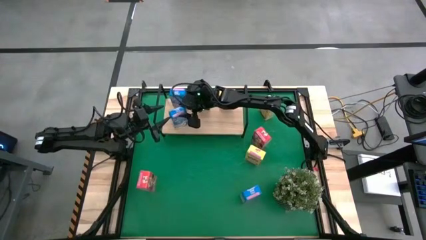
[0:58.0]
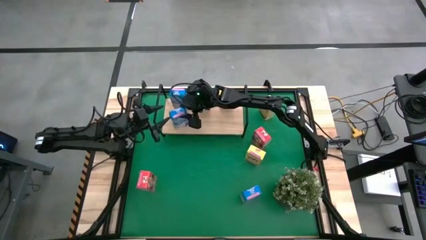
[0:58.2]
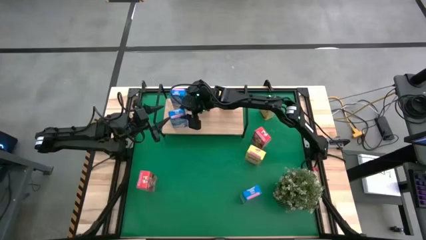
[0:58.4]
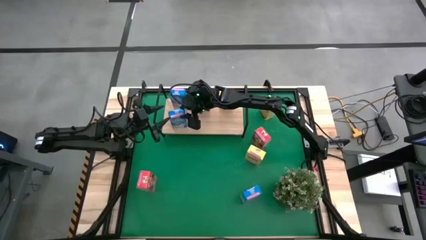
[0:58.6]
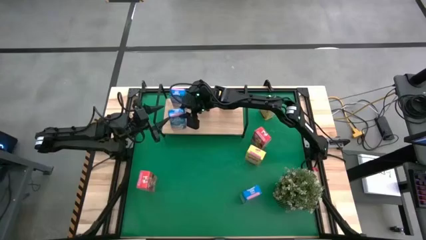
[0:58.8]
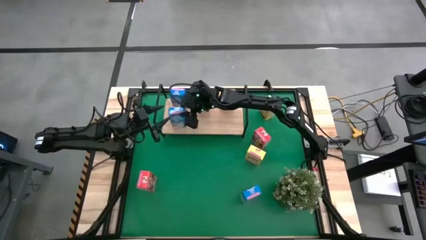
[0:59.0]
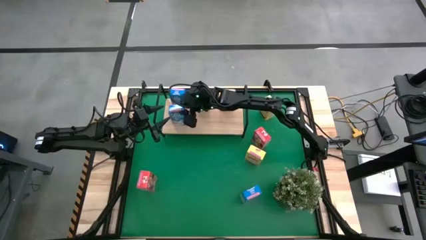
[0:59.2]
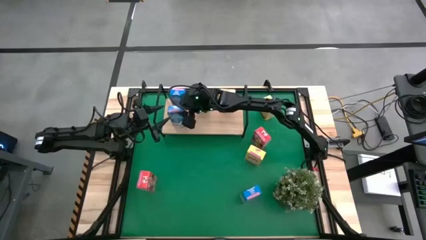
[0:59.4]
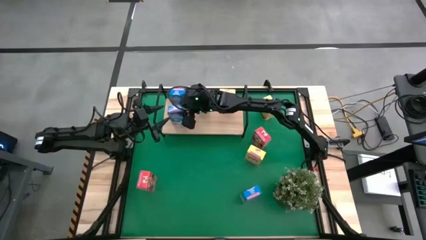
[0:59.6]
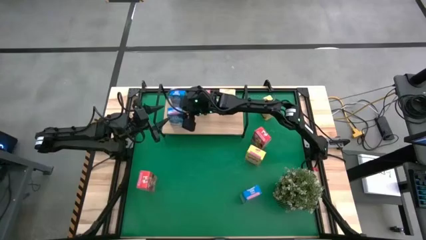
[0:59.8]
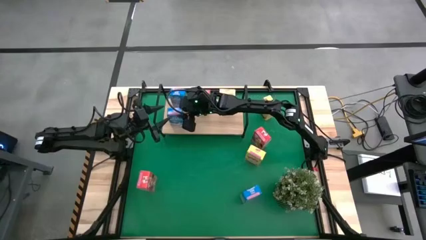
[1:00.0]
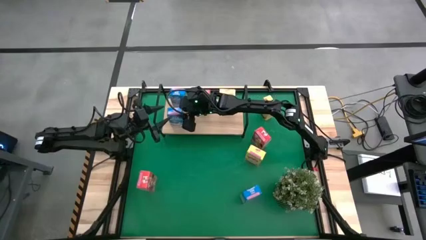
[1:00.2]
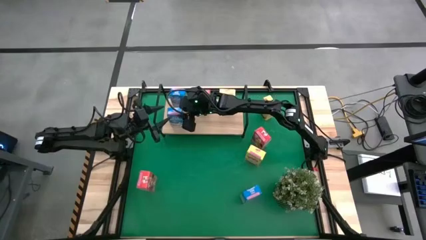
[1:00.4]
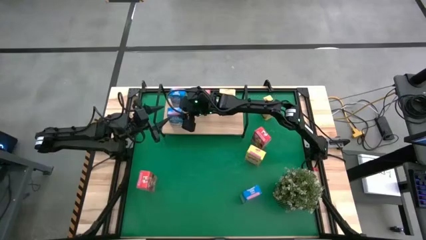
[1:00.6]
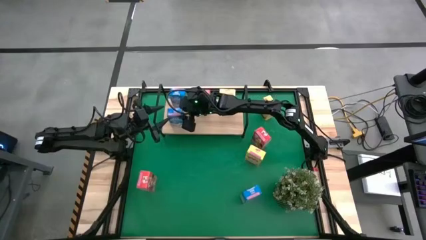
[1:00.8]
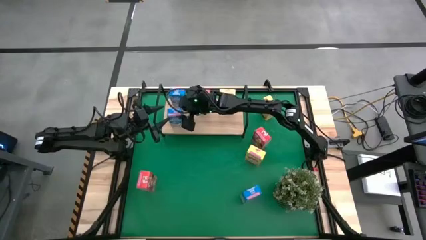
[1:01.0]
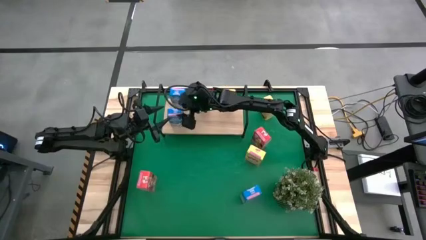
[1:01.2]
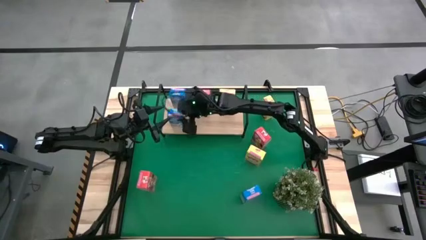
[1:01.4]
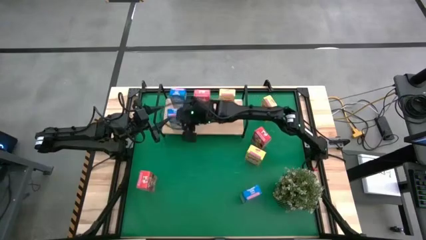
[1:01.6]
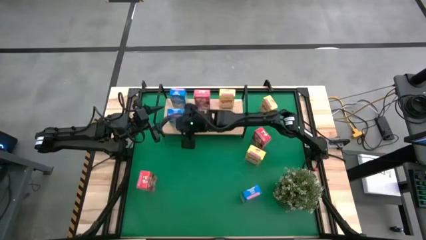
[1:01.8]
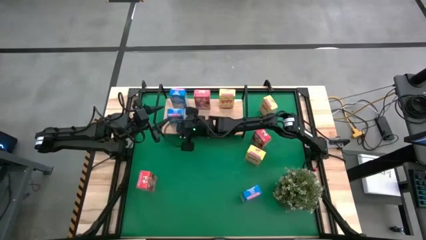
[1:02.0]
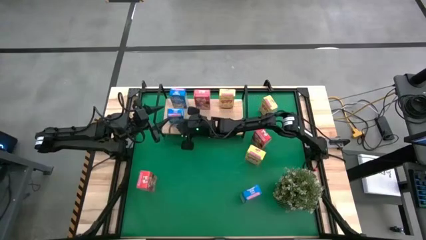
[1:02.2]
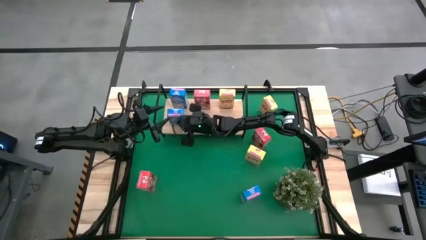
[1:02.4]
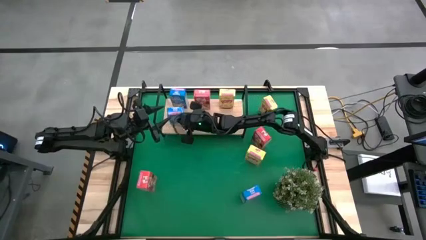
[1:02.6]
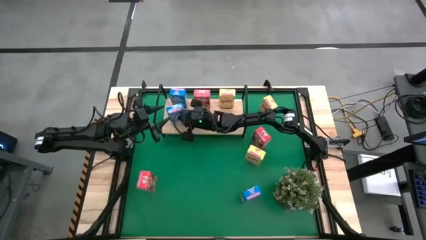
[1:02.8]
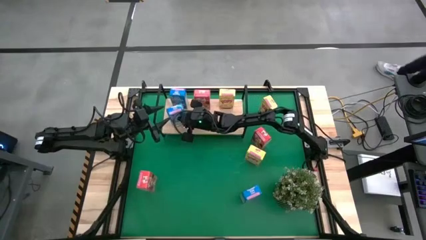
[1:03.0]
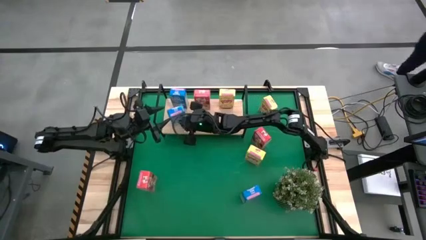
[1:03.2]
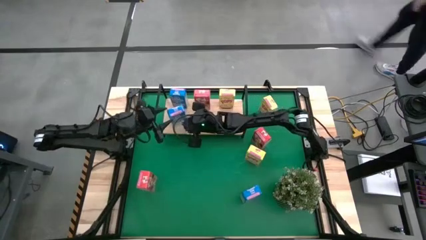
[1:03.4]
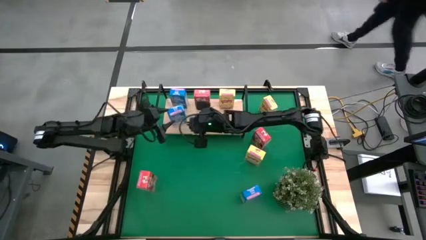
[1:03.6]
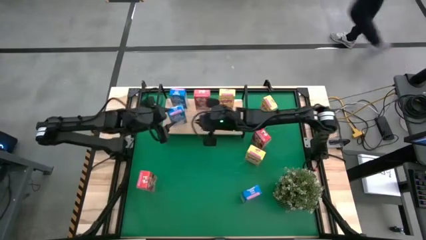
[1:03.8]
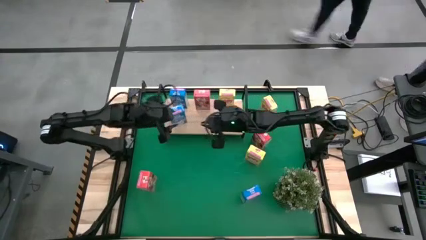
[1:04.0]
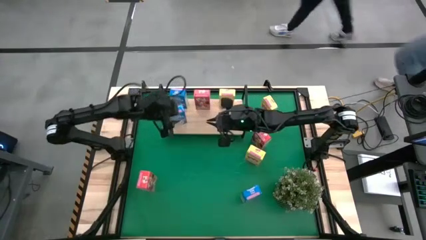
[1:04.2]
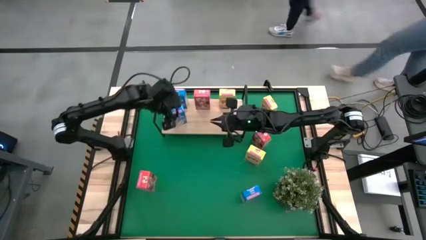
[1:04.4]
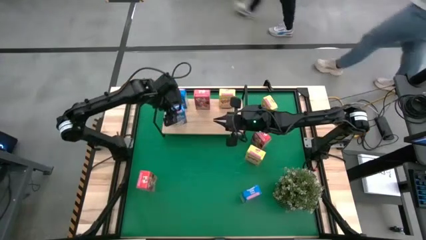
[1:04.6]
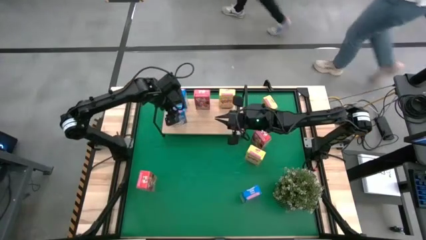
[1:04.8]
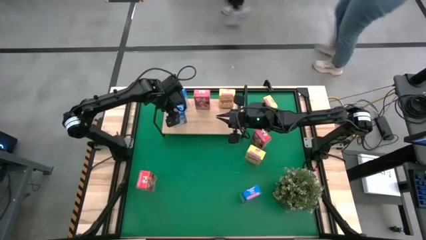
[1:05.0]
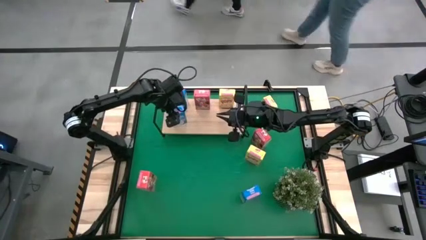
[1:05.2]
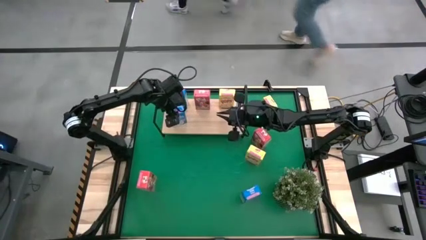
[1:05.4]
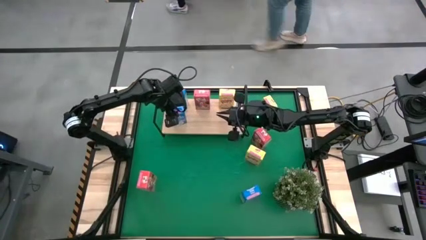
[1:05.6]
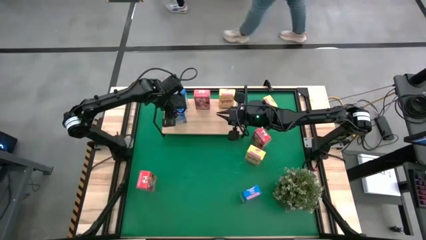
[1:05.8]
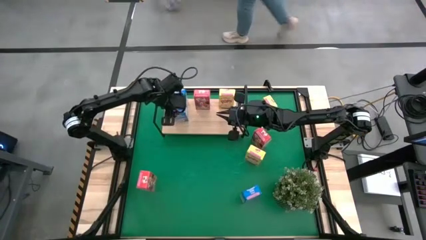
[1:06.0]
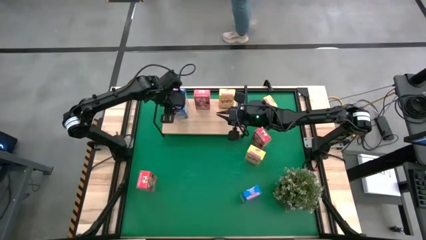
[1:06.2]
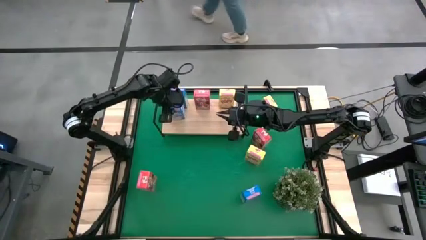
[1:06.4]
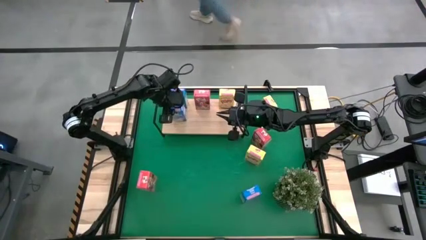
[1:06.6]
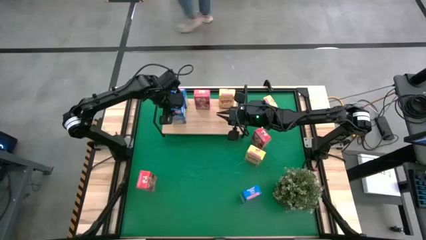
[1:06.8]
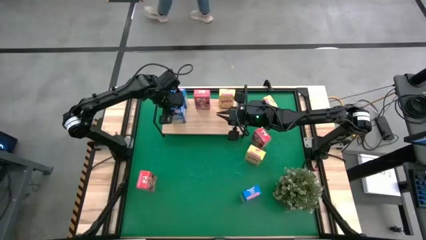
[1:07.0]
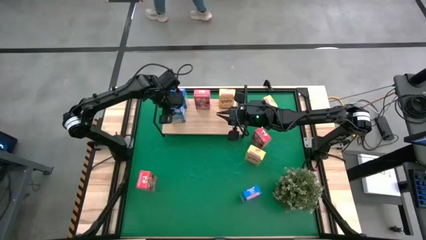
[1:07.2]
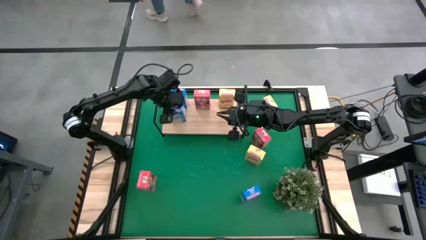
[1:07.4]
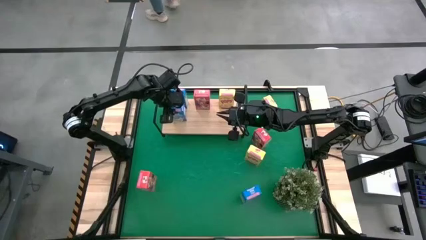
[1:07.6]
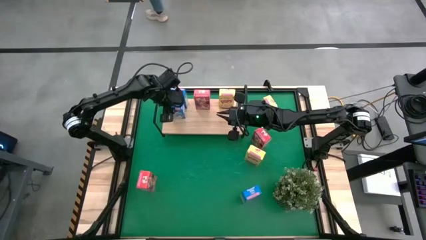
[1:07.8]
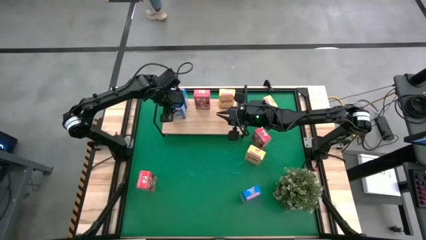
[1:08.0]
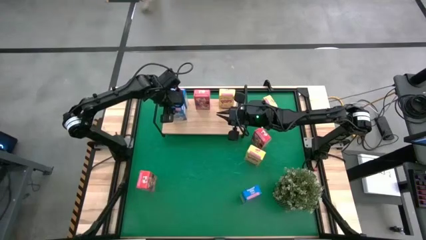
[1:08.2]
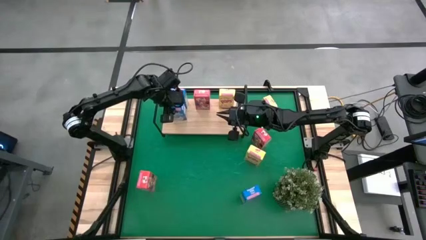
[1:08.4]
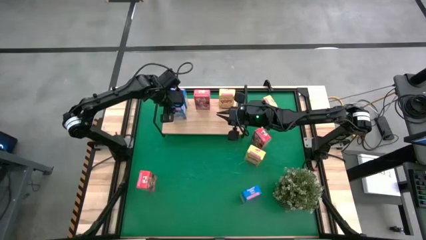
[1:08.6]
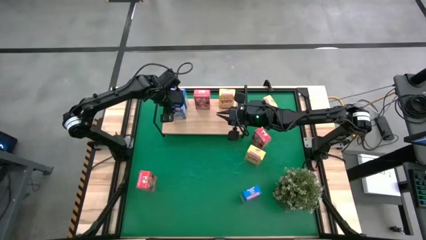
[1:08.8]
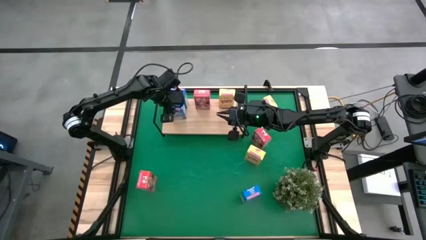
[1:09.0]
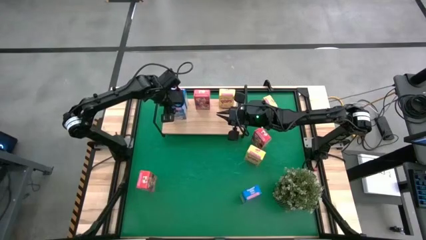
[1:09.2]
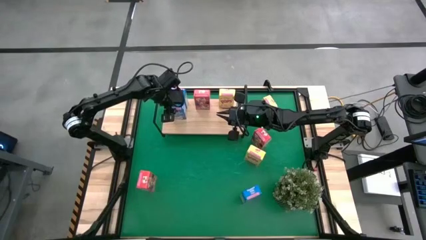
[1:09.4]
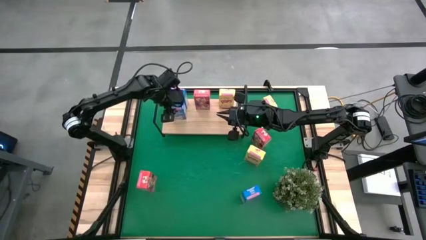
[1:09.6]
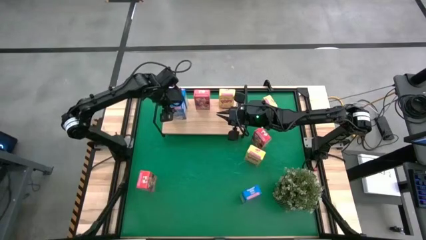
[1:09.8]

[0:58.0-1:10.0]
Task: Stack cereal on shelf
Put the left blue cereal box on the shelf aligned with the other blue cereal box

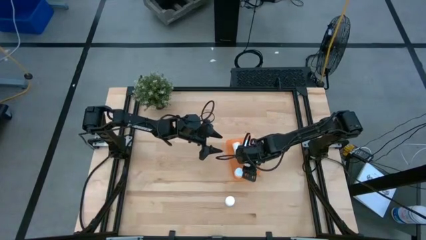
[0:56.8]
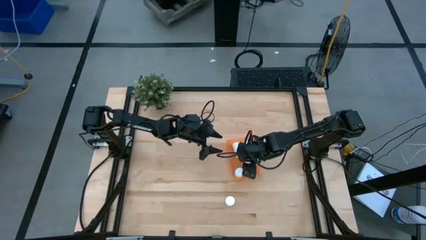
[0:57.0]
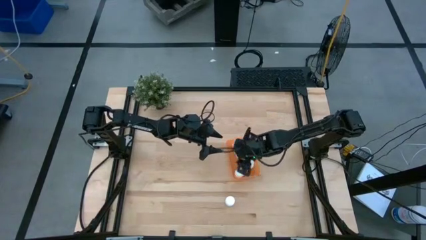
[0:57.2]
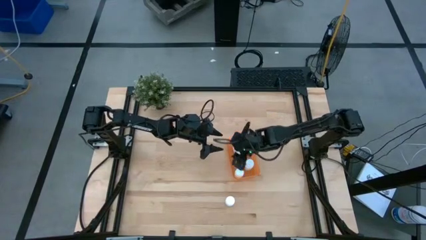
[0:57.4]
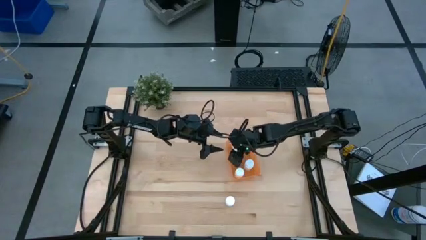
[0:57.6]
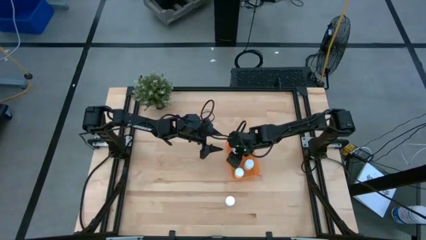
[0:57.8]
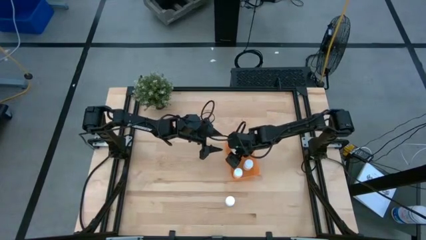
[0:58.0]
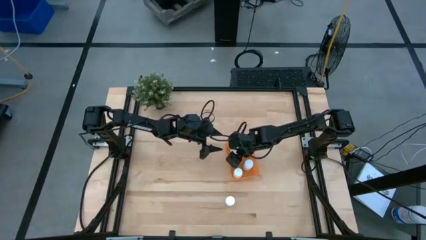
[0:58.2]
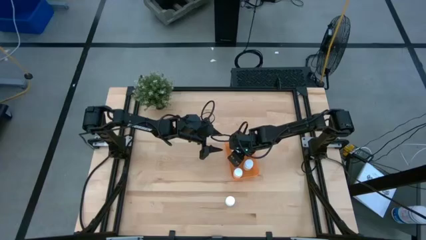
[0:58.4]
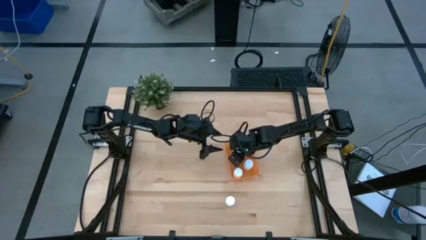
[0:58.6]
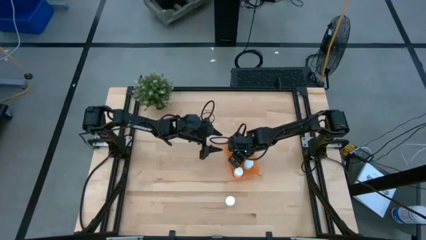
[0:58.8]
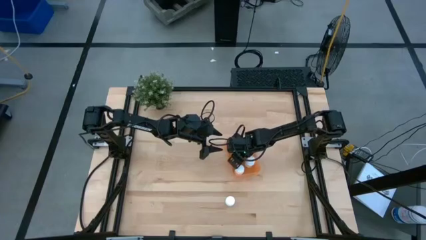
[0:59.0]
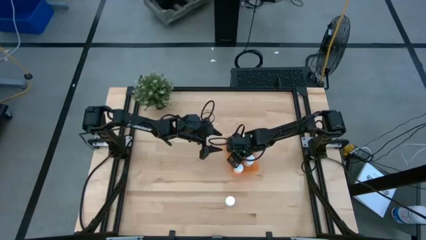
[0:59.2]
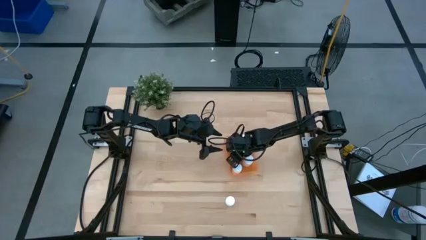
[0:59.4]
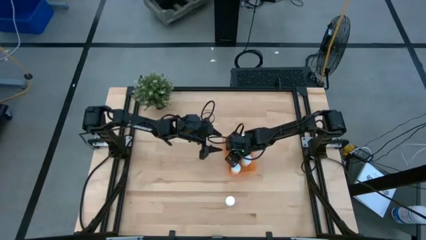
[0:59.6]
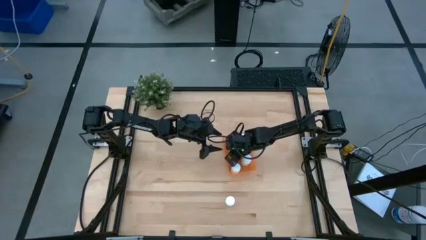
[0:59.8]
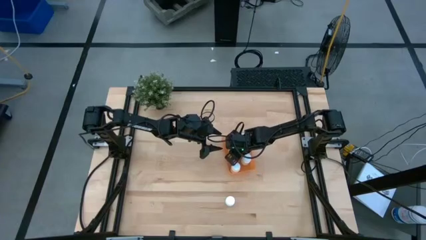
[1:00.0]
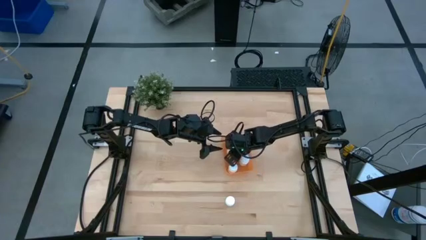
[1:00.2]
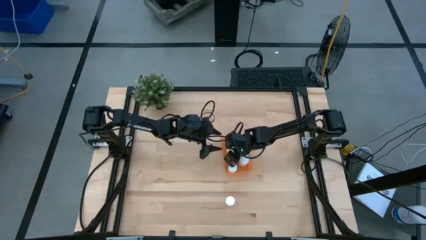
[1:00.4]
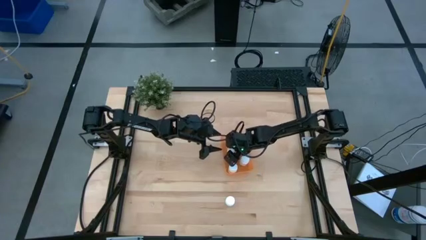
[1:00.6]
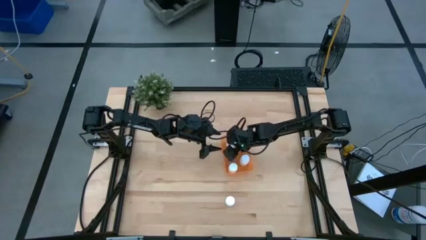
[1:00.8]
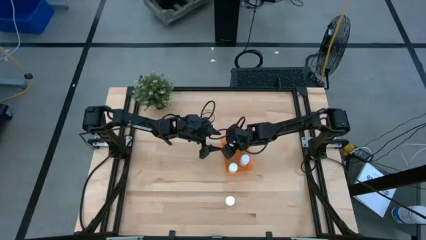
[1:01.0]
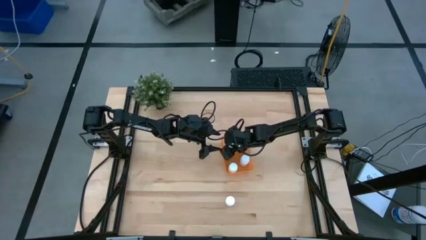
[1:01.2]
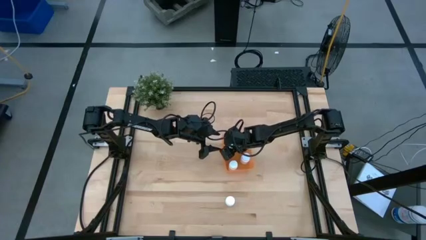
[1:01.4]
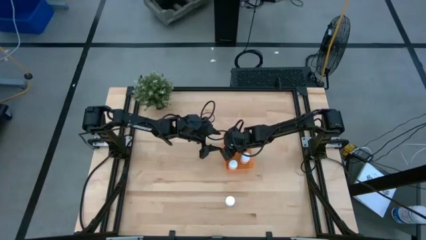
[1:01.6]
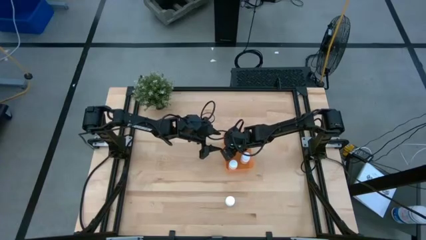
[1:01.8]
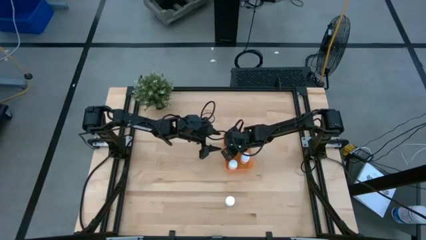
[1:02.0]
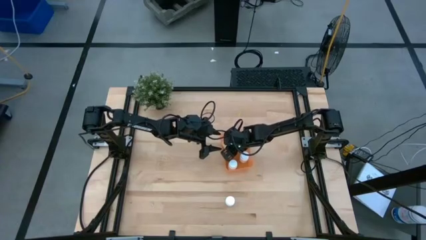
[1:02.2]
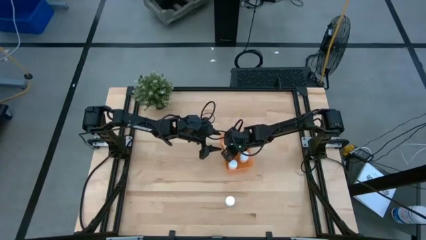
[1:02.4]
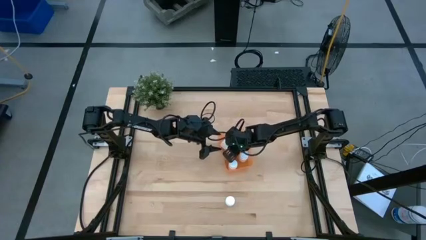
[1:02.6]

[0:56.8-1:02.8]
Task: Pick and place pill bottles into a basket
Adjust the white medicine bottle in the orange bin
